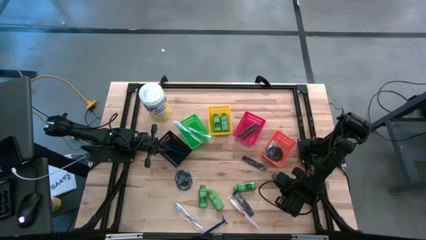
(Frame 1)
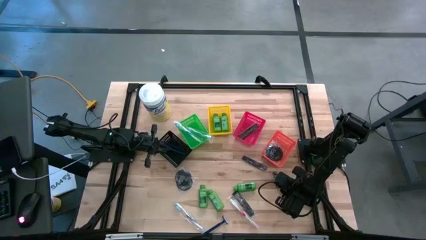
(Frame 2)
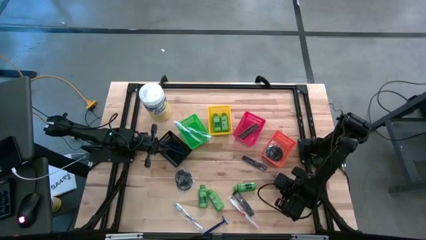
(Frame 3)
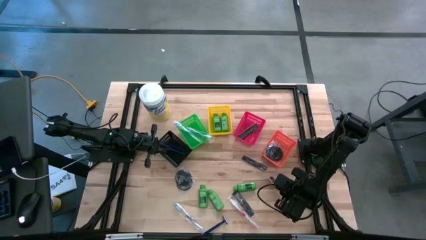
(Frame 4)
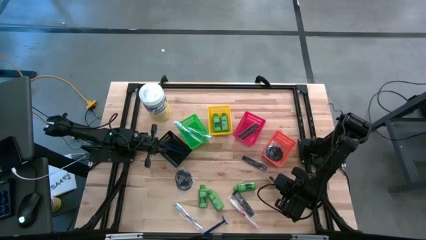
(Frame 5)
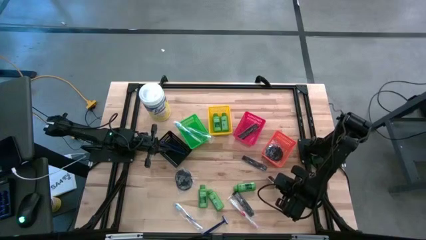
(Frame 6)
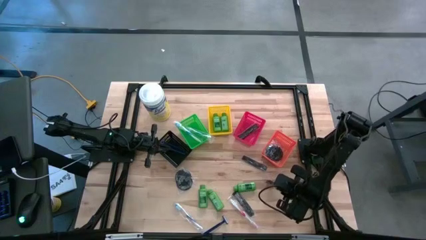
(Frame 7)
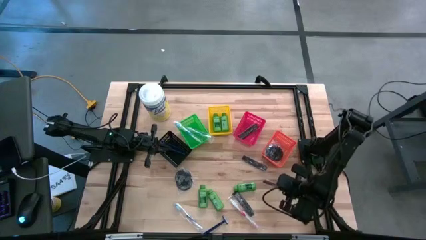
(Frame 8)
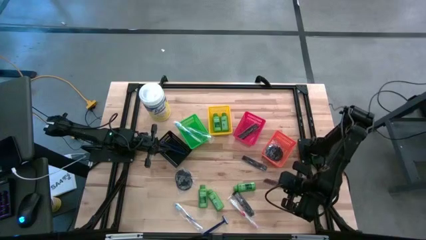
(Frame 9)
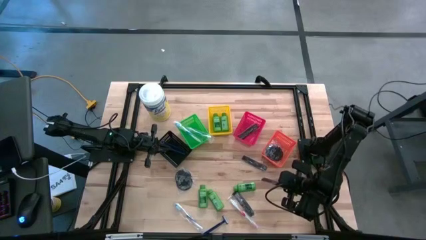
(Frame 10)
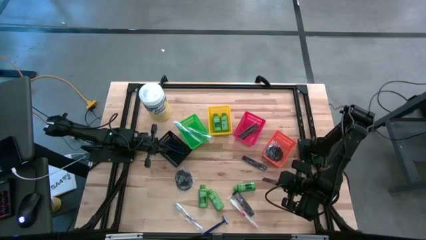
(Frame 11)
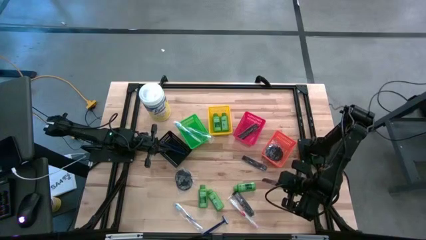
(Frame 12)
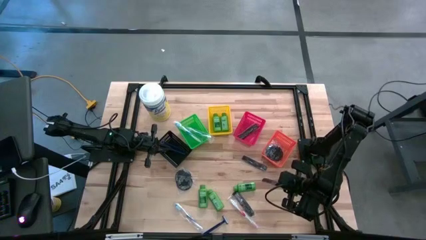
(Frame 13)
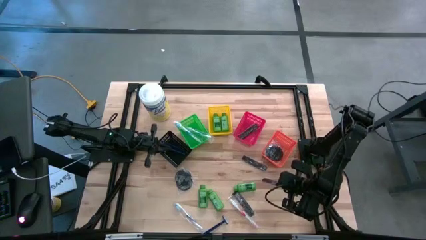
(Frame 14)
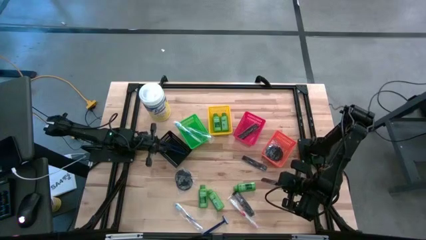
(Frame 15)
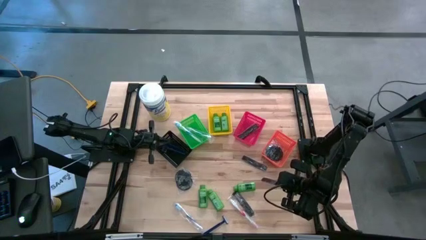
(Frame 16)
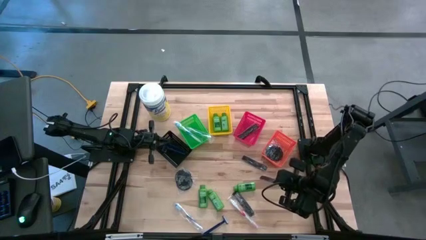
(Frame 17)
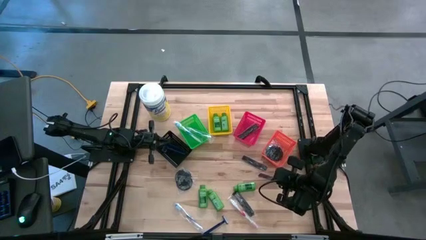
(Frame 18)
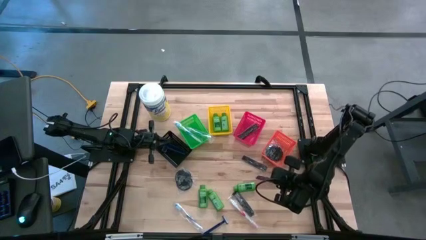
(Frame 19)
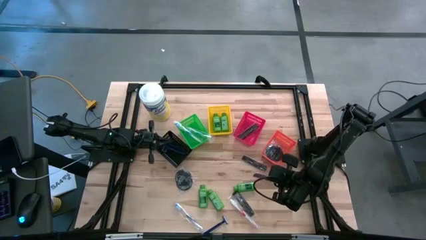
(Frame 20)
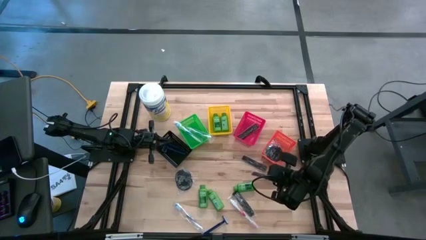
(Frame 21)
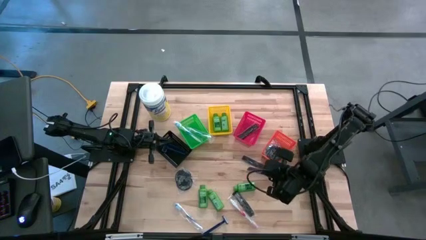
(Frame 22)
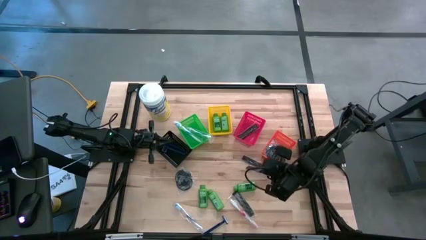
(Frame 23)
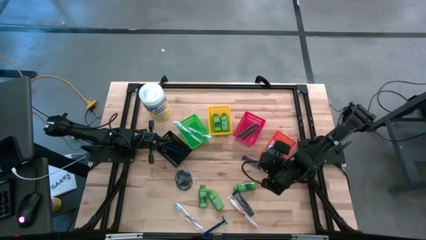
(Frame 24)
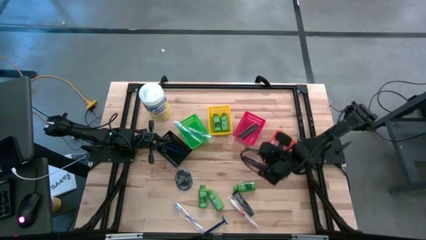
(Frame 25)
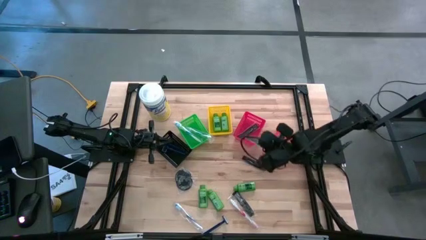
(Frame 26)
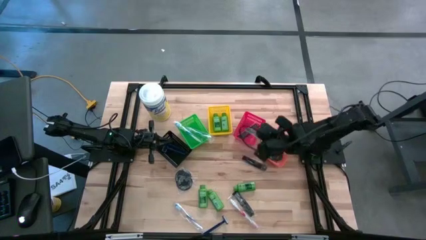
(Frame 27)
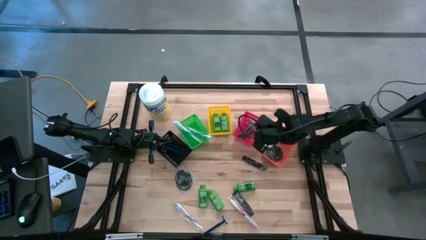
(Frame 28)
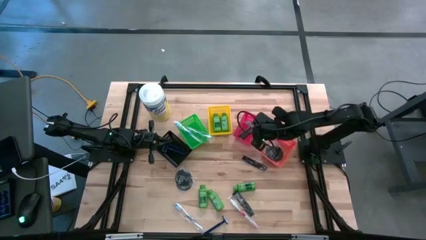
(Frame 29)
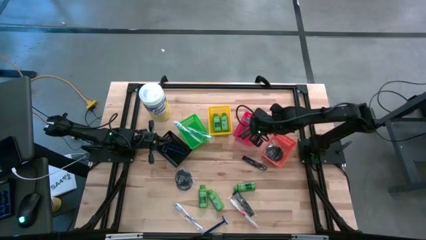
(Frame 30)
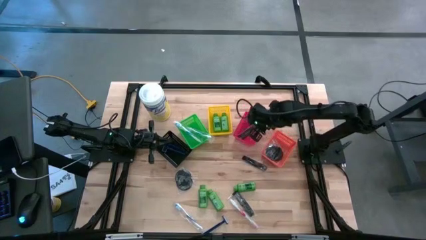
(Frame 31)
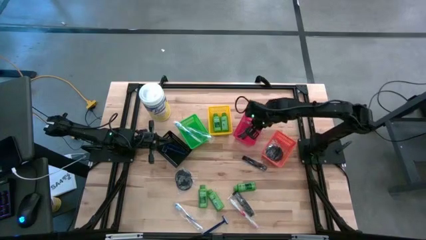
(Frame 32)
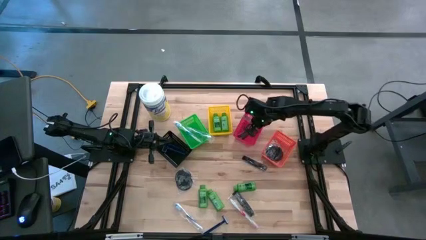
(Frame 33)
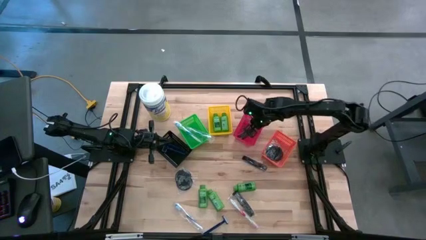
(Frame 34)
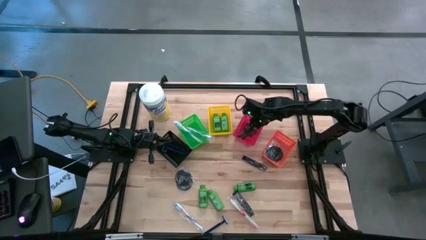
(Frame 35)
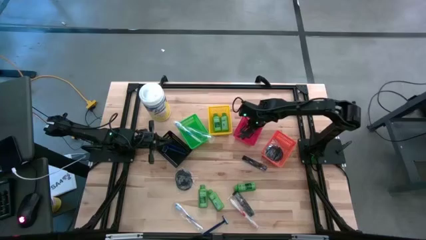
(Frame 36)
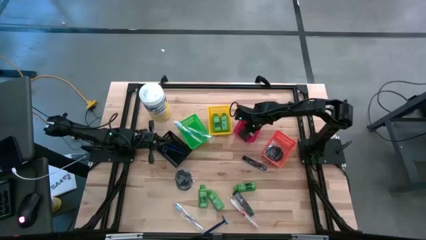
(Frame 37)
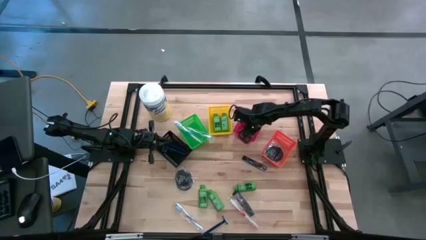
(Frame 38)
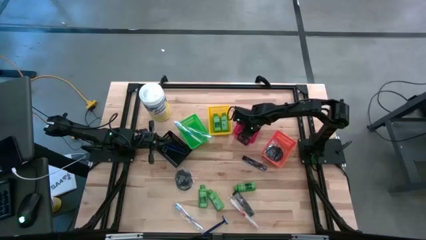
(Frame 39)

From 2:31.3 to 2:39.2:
Task: Pick & Place Travel size toiletries
Put the black hair comb into the red bin

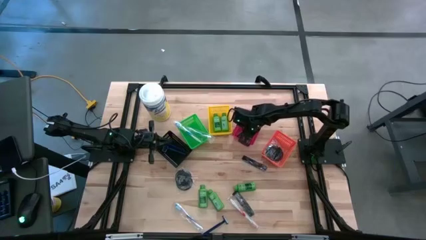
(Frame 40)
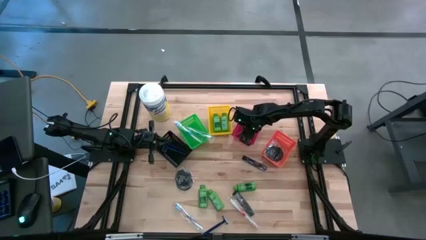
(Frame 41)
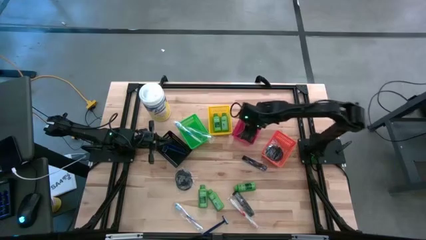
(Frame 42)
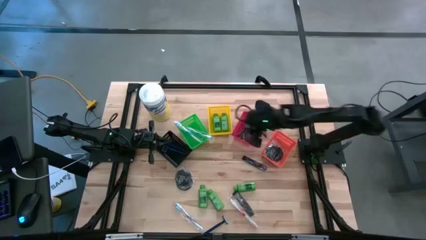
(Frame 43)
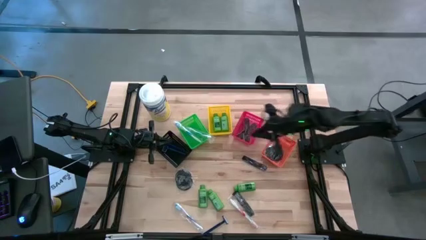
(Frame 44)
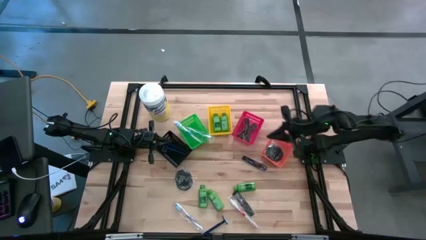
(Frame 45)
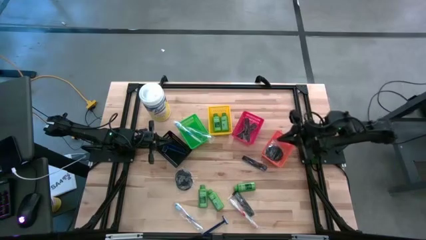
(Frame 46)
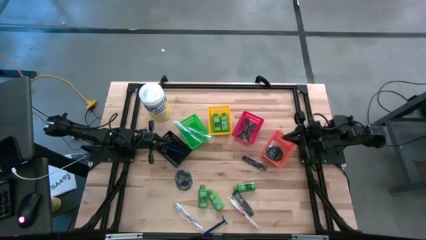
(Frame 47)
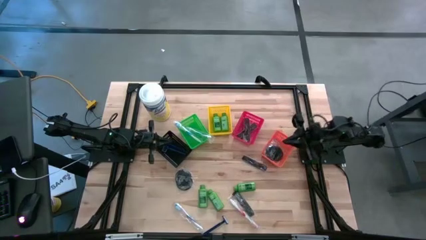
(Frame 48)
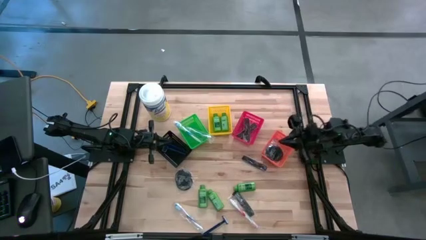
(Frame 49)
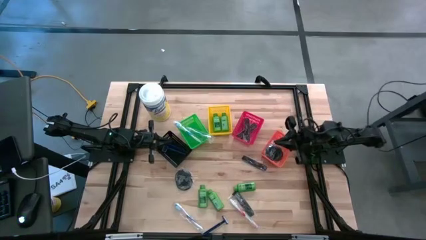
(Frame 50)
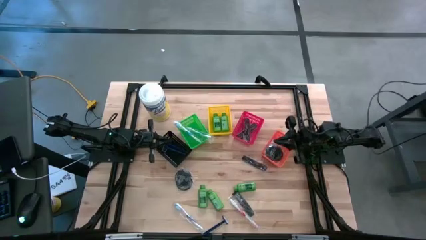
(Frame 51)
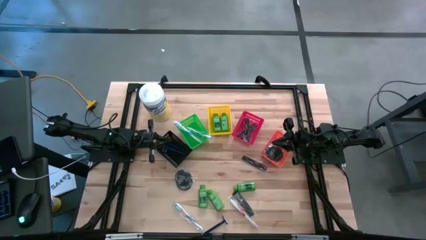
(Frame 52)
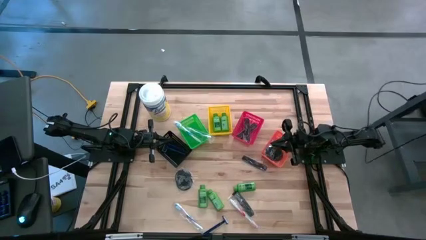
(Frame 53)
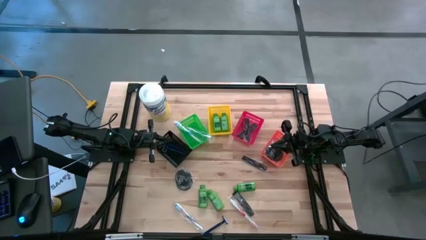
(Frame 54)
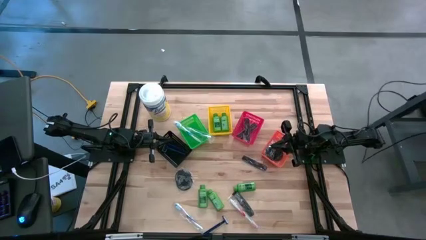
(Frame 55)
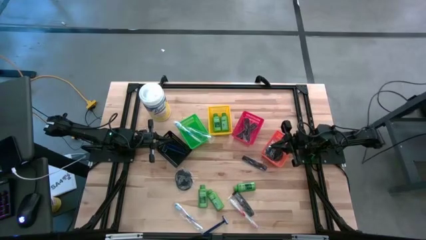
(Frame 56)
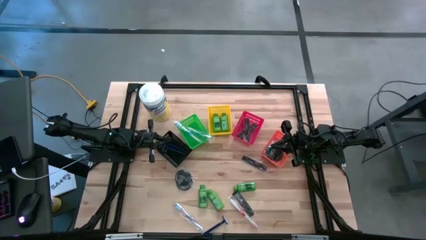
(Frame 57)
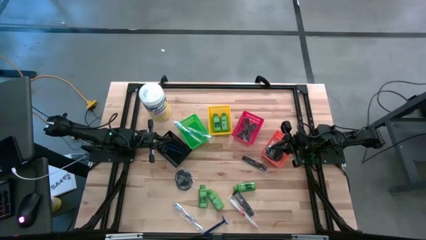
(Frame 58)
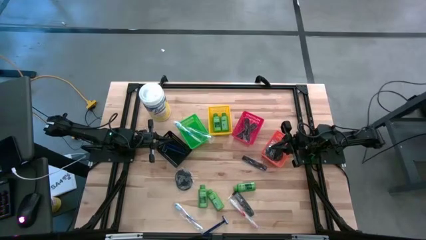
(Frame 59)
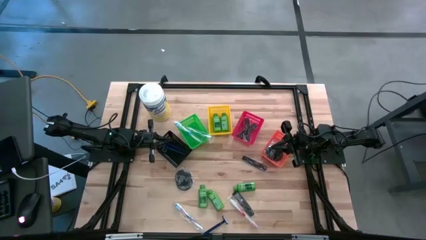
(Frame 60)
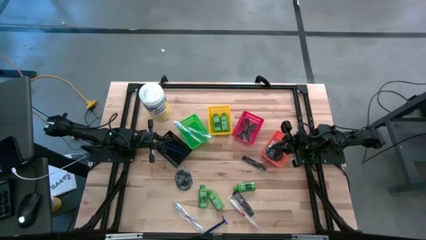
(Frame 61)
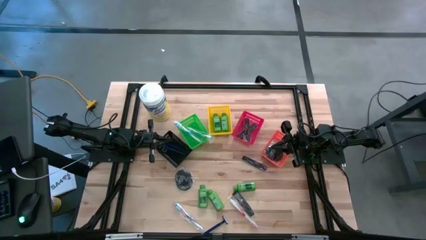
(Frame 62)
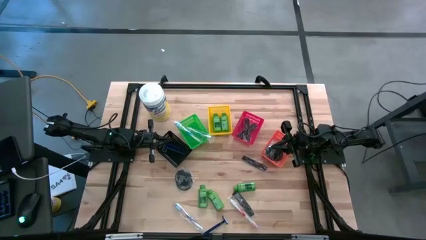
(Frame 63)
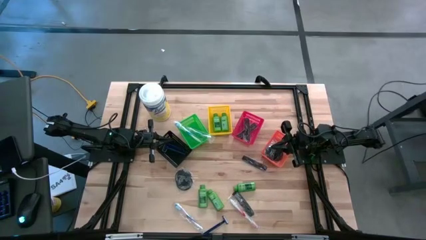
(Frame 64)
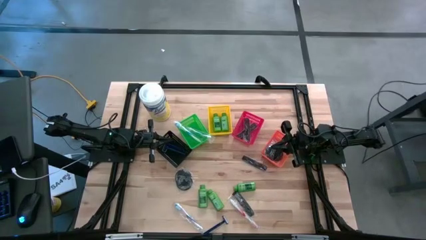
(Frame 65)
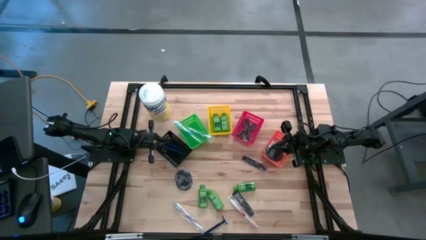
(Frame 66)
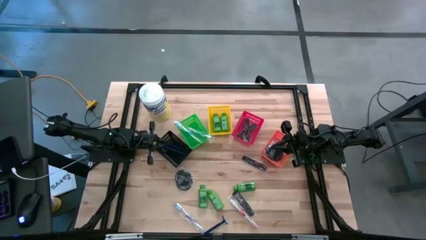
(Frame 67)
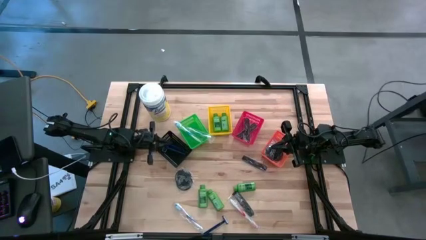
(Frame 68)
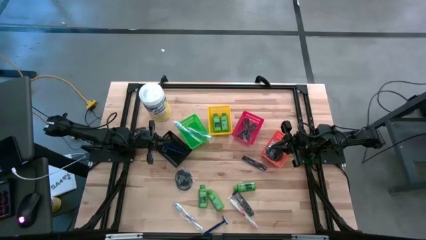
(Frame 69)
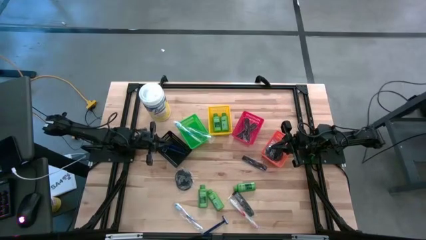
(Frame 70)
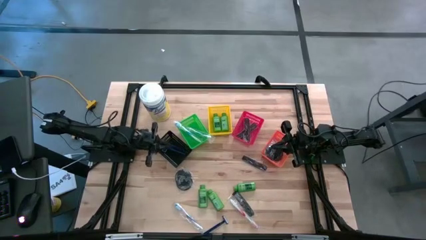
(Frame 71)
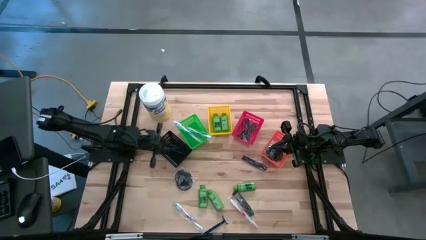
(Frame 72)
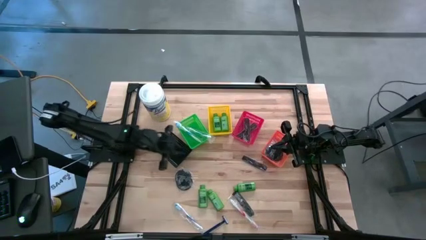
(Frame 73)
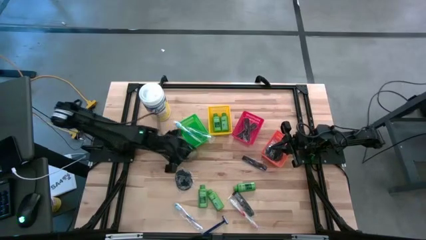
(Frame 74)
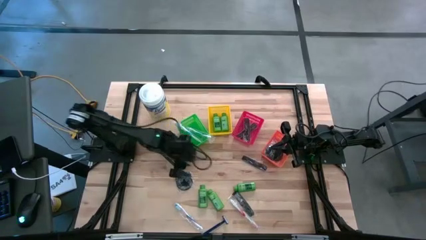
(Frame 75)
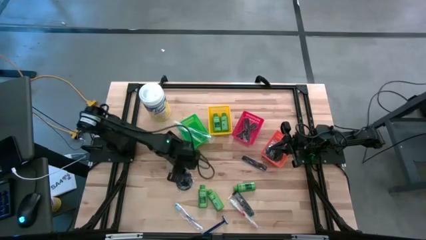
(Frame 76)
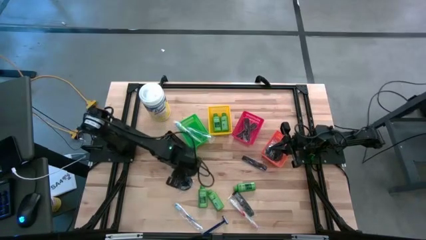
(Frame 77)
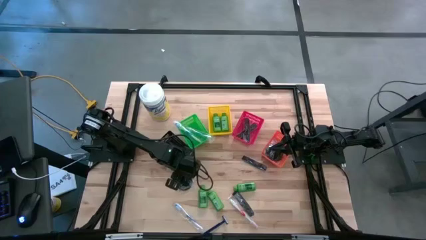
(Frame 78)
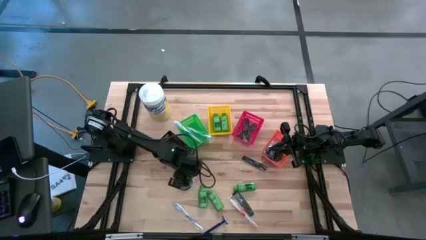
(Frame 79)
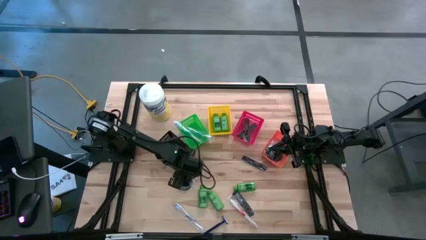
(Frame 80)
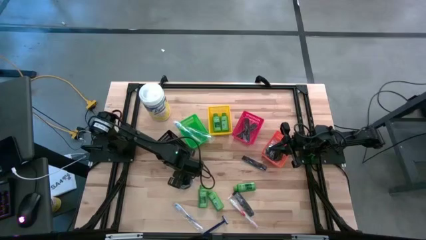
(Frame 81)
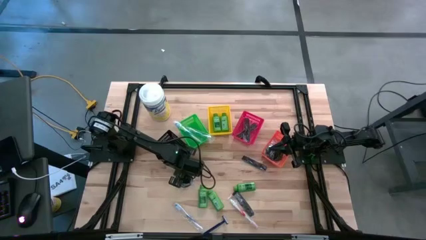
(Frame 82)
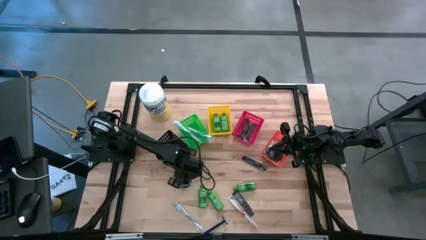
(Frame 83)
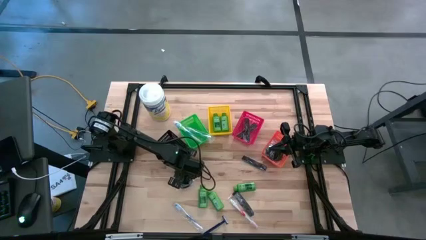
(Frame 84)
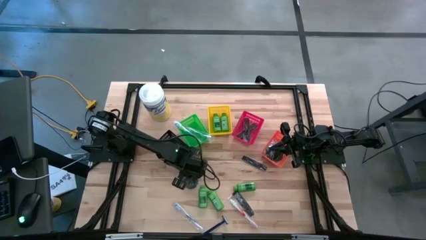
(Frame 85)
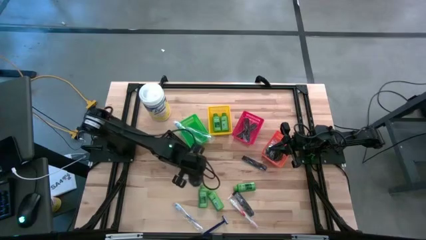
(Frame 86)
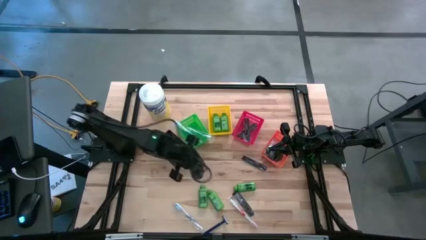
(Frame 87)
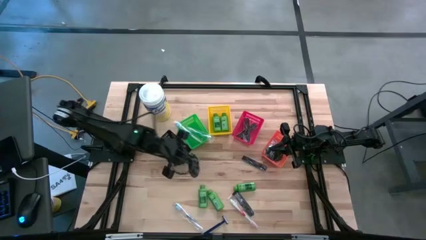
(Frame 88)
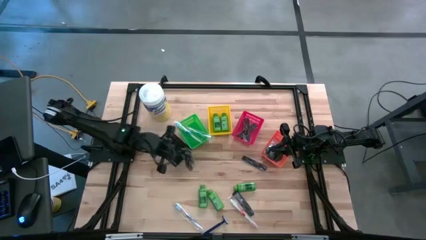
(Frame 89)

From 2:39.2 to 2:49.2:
Put the black hairbrush into the orange bin
